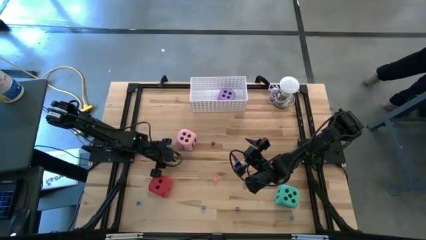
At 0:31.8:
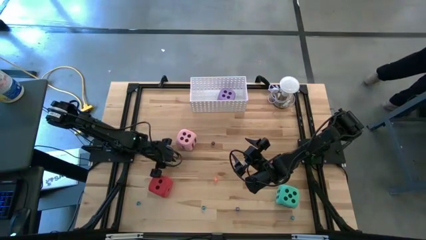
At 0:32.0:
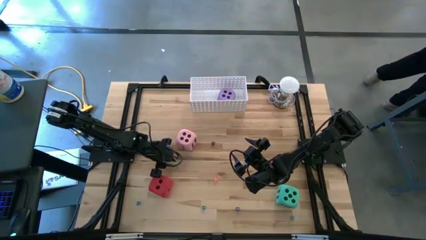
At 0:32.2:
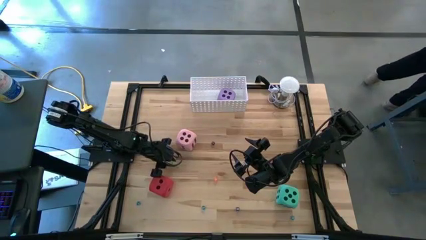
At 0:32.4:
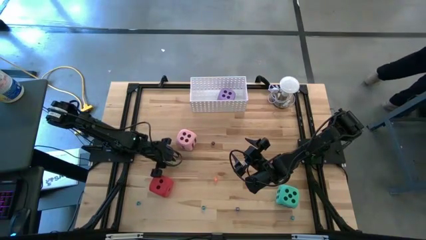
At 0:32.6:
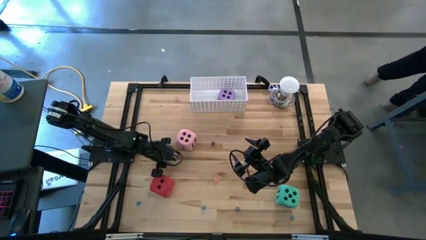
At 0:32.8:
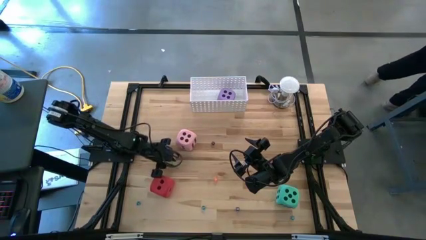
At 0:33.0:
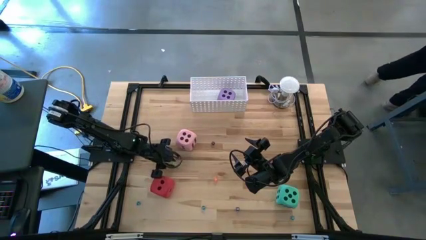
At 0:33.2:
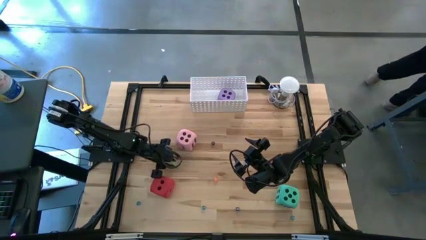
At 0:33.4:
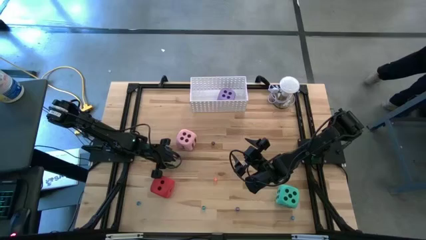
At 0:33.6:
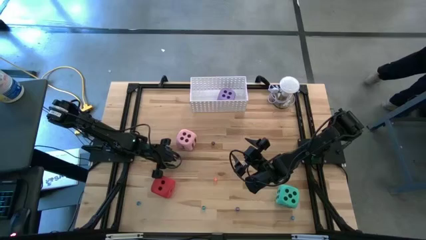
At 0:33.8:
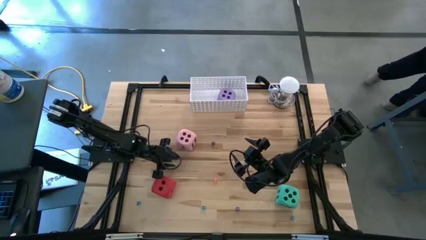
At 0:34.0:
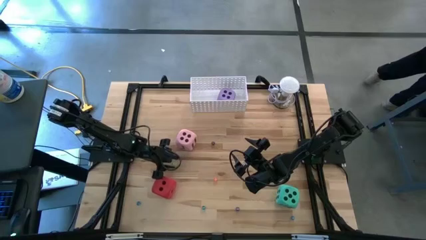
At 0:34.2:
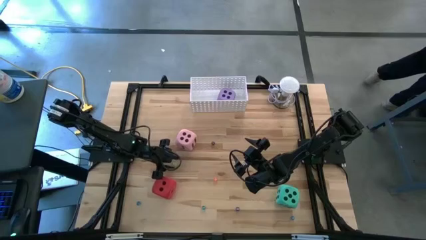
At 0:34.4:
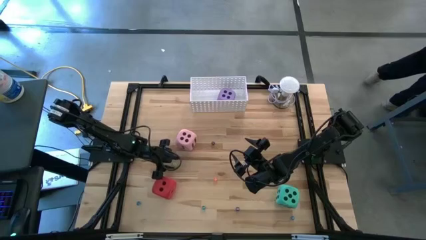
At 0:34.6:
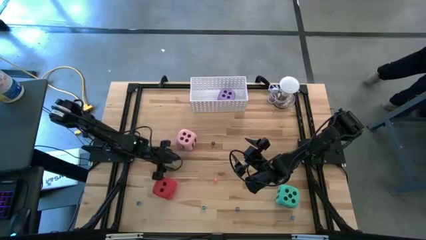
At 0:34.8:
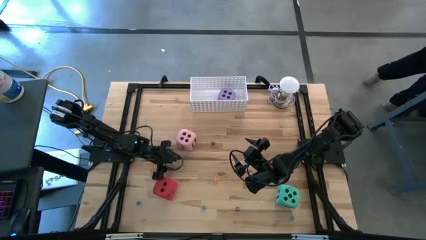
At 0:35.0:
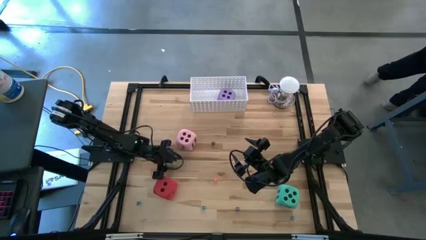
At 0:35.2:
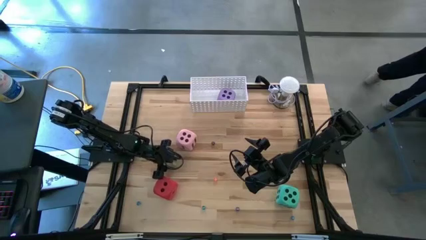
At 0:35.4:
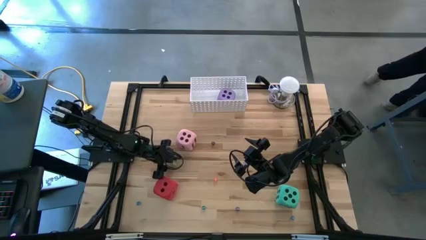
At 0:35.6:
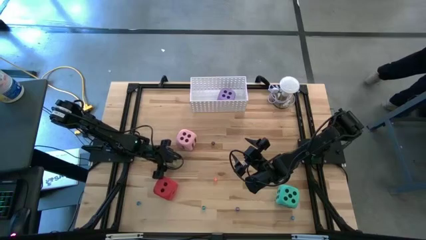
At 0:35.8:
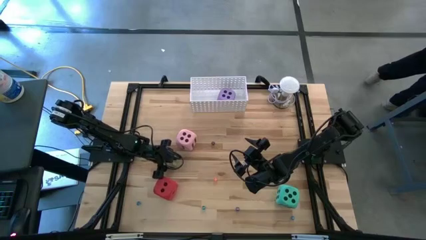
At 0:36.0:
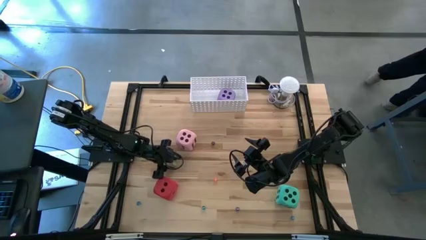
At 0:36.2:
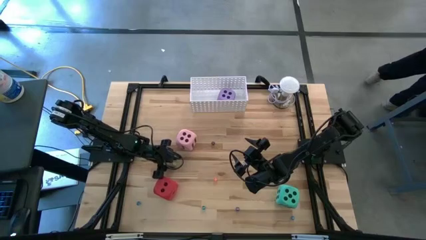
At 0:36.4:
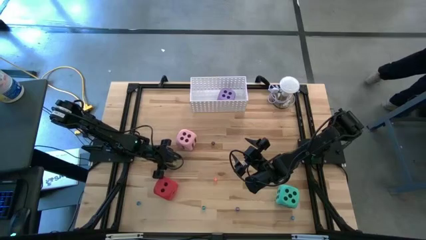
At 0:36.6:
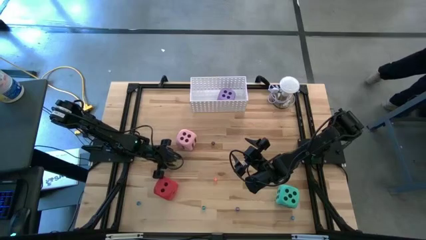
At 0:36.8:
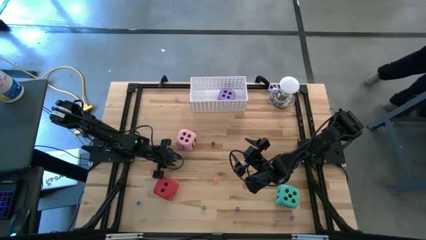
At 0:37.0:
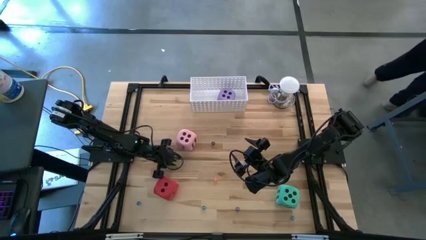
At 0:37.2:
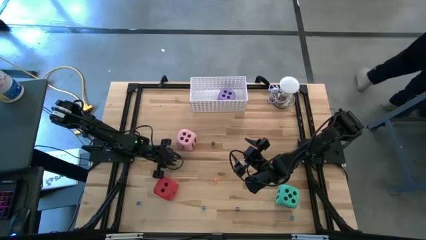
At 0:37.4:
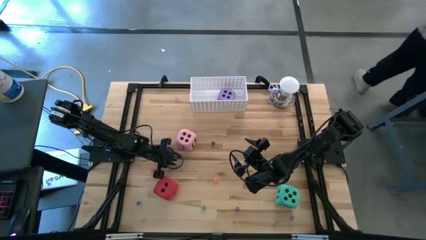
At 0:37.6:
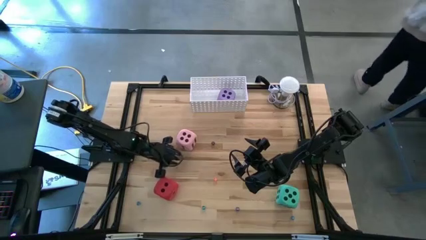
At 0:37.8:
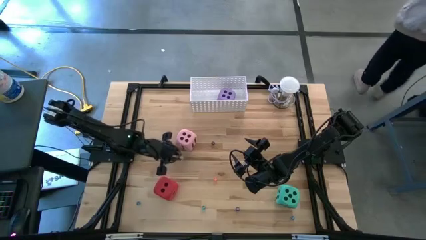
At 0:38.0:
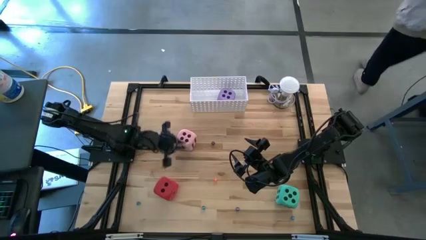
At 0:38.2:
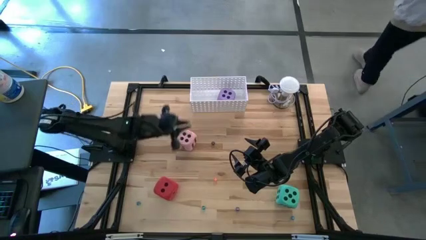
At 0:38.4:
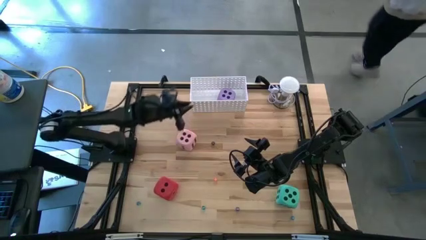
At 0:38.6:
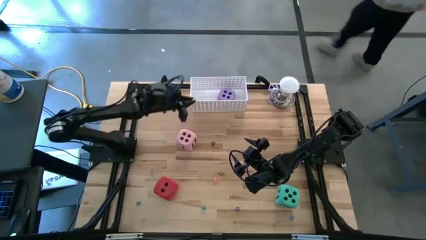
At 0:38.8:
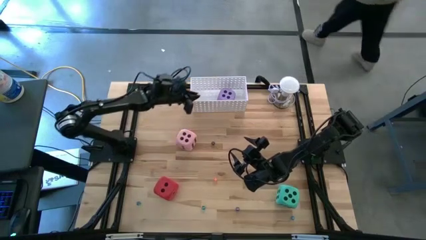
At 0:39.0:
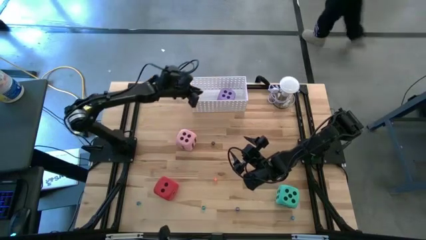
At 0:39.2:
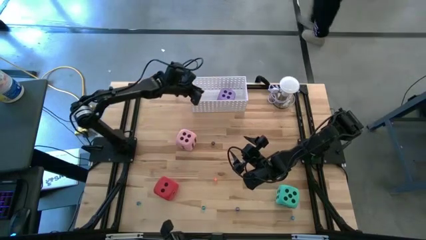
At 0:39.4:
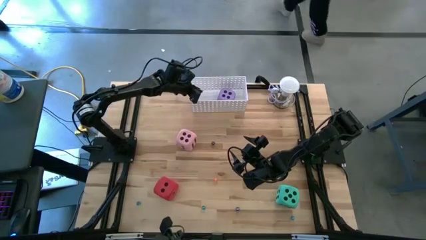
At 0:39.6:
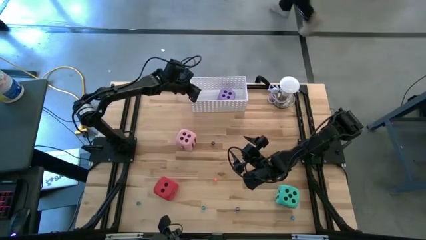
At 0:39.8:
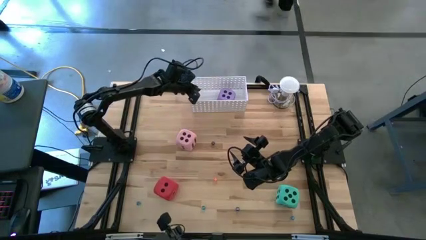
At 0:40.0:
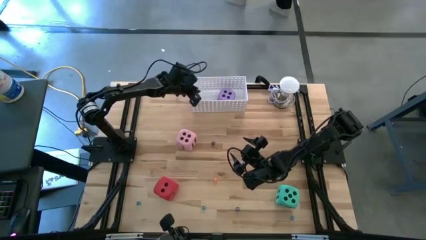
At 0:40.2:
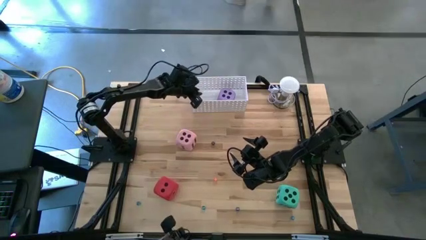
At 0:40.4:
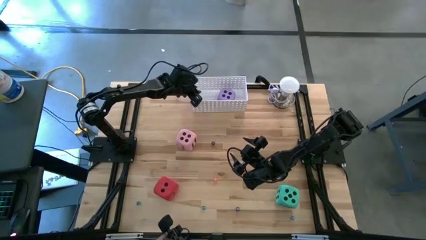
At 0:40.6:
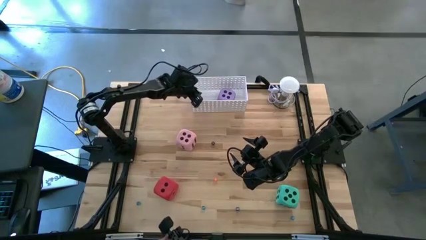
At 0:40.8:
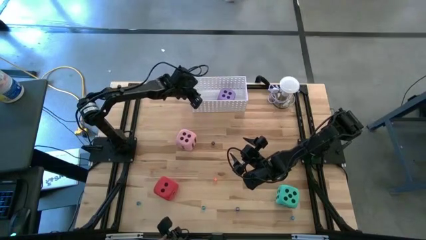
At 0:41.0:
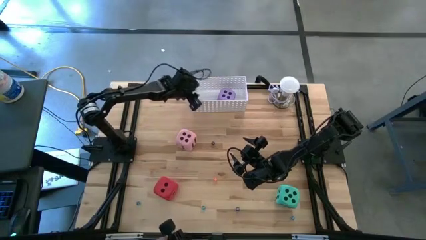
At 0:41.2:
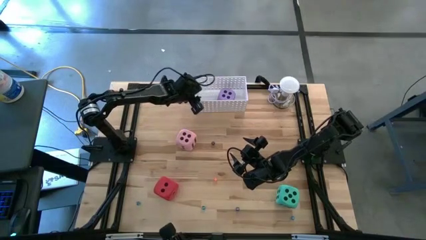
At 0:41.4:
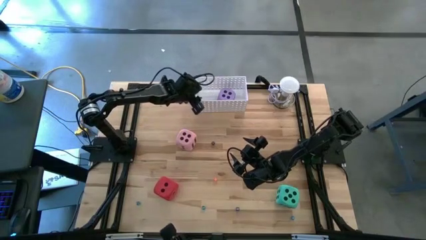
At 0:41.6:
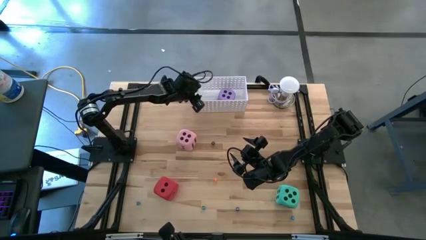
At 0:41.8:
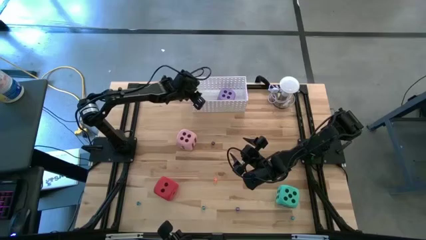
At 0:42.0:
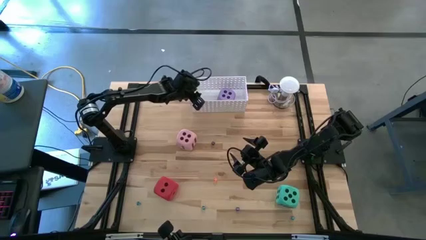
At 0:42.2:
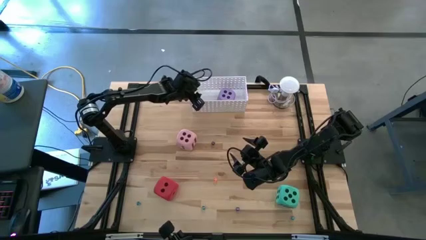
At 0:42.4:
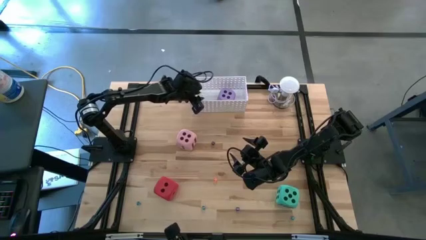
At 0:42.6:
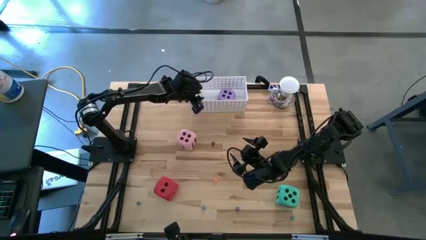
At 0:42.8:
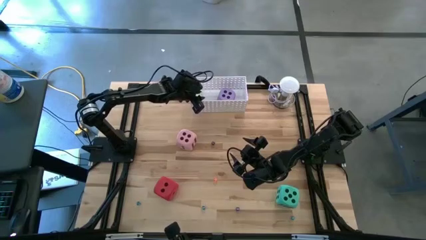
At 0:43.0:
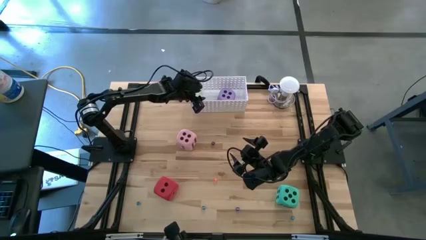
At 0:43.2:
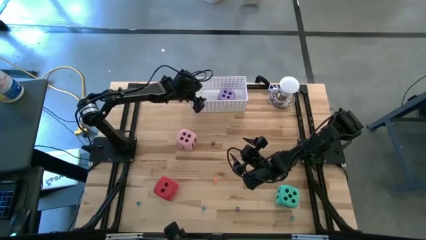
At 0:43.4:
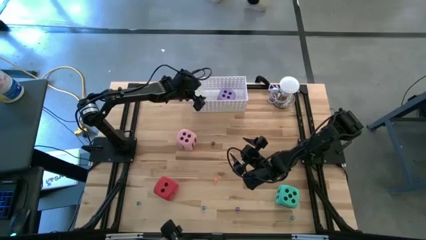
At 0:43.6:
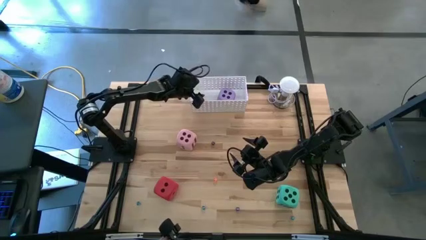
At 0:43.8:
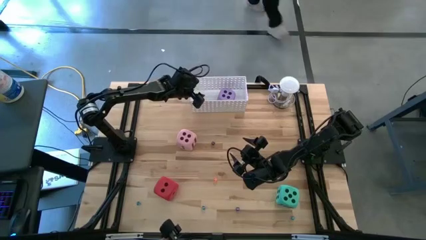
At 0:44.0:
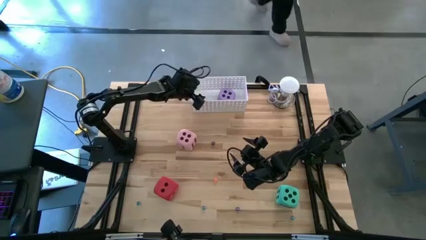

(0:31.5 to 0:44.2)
Task: Pick & Place Dice
Put the small yellow transparent dice into the white bin
